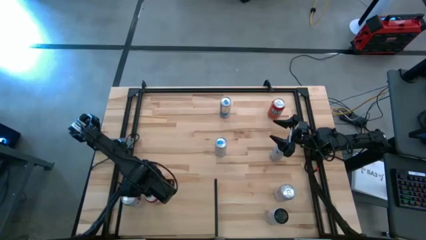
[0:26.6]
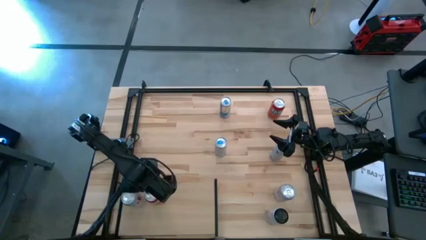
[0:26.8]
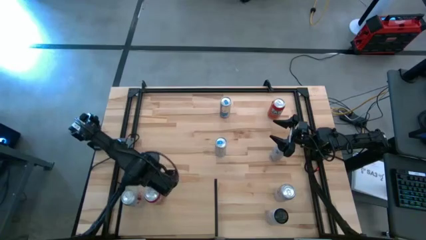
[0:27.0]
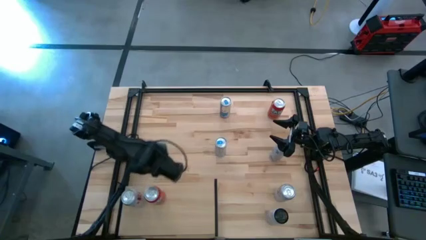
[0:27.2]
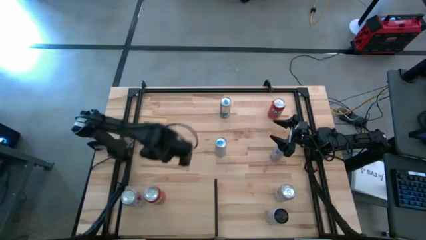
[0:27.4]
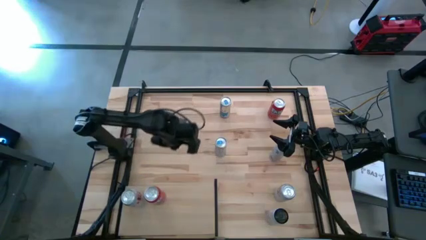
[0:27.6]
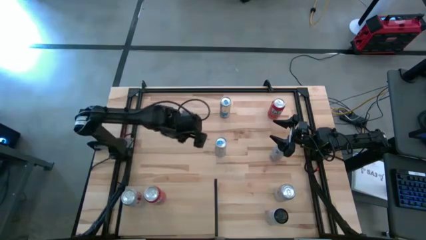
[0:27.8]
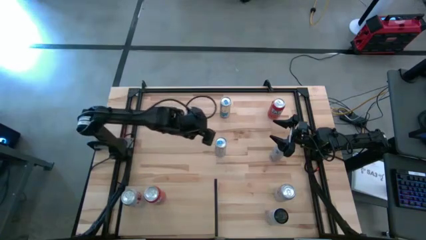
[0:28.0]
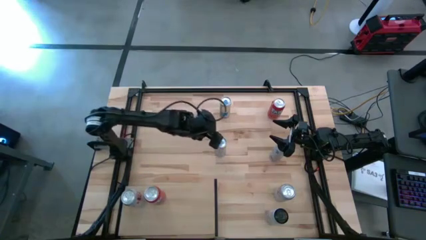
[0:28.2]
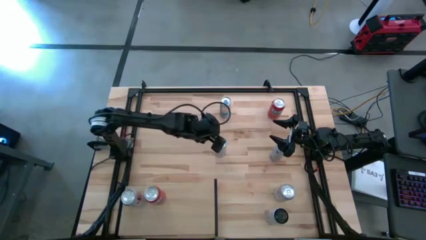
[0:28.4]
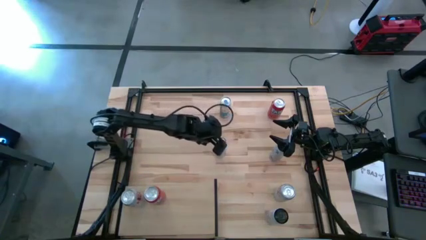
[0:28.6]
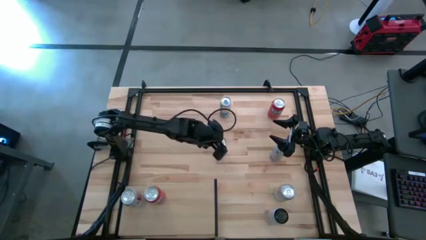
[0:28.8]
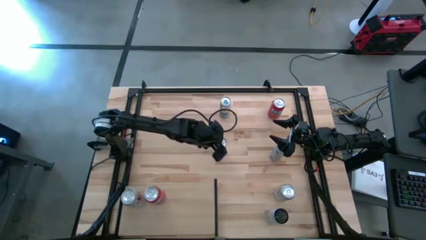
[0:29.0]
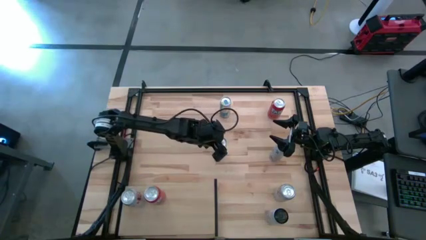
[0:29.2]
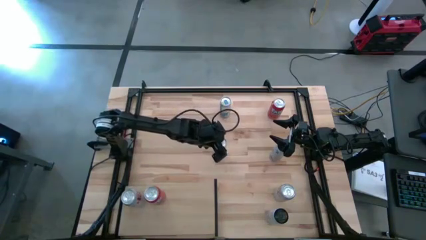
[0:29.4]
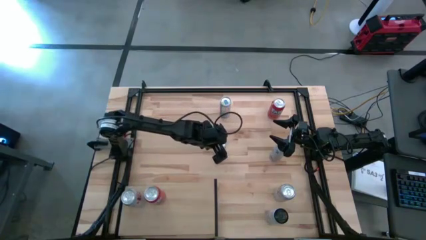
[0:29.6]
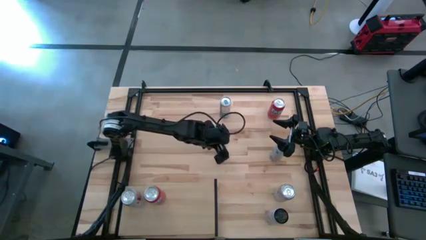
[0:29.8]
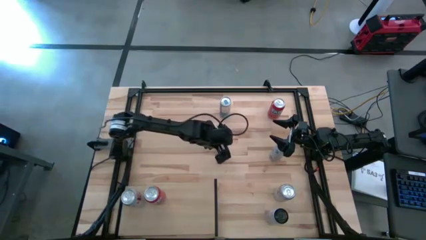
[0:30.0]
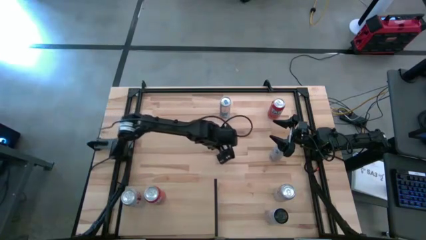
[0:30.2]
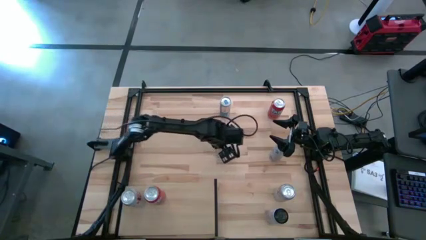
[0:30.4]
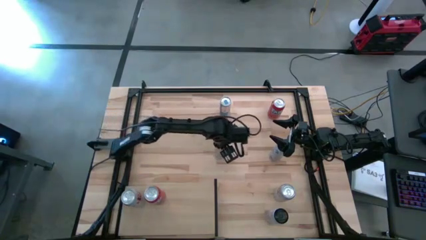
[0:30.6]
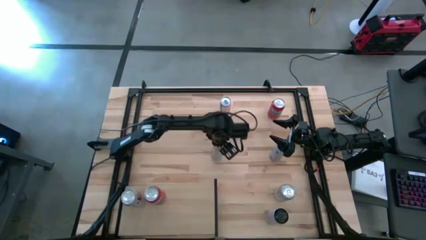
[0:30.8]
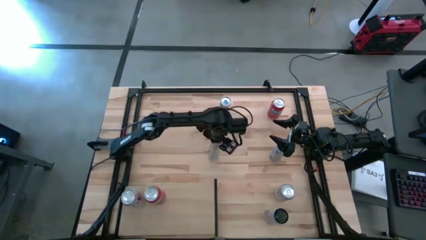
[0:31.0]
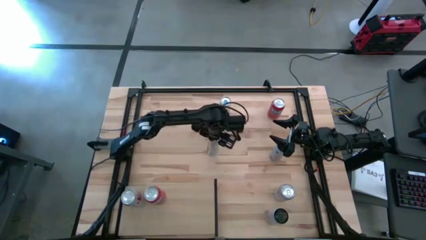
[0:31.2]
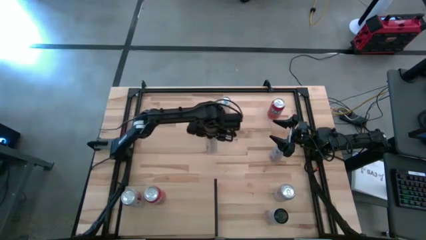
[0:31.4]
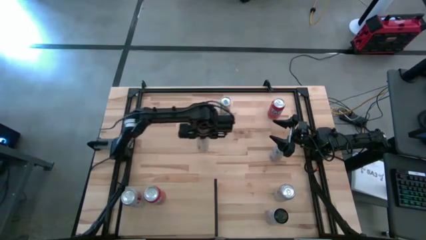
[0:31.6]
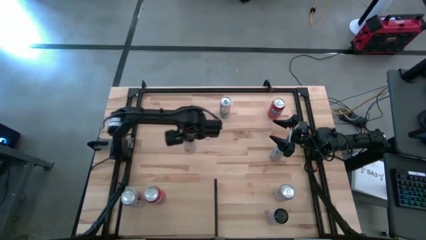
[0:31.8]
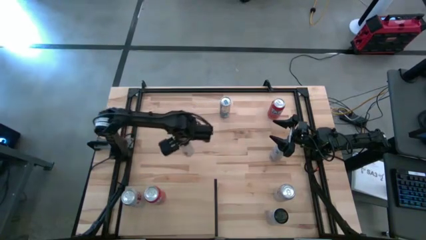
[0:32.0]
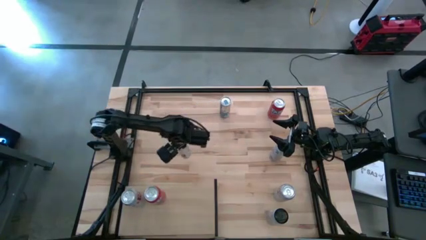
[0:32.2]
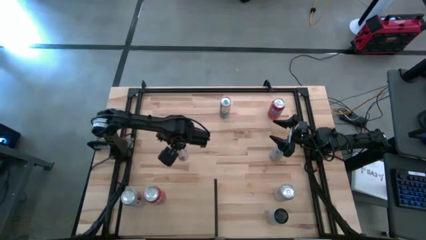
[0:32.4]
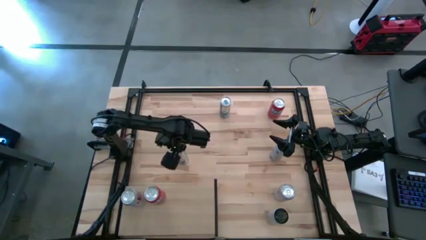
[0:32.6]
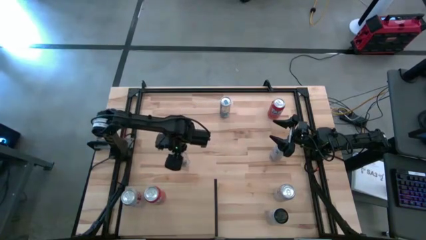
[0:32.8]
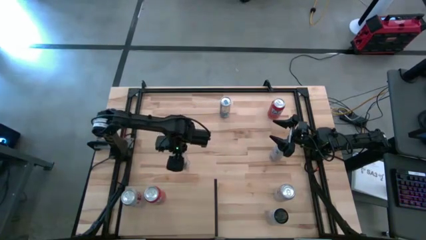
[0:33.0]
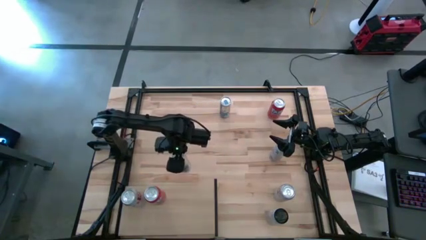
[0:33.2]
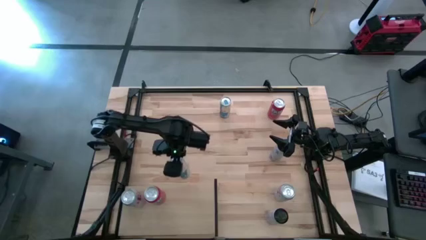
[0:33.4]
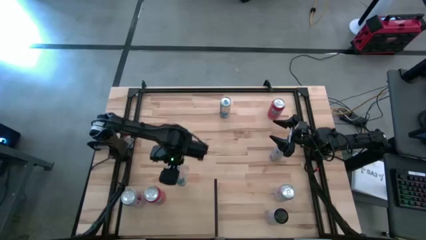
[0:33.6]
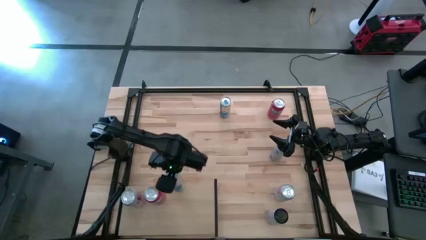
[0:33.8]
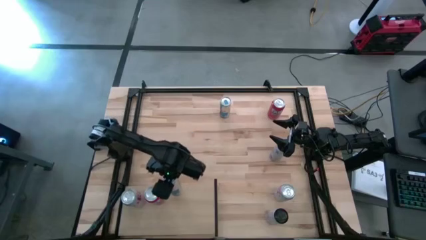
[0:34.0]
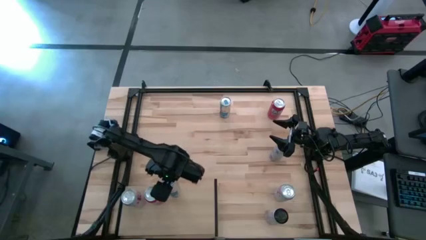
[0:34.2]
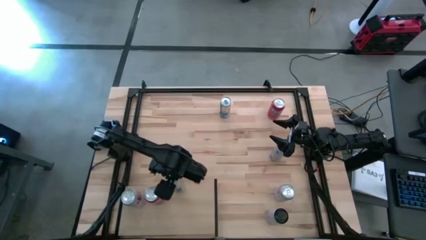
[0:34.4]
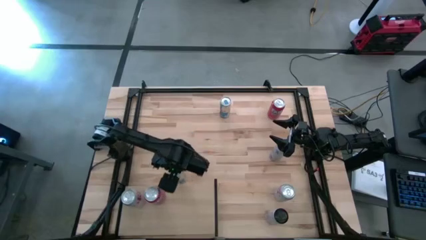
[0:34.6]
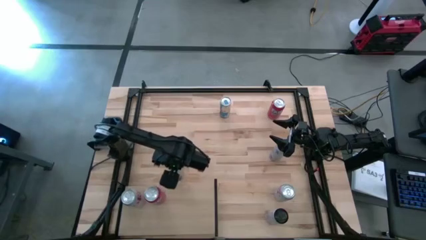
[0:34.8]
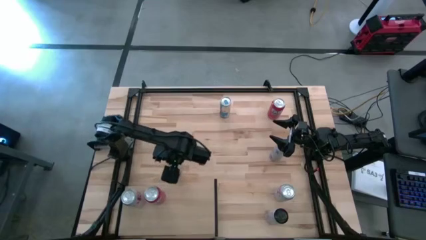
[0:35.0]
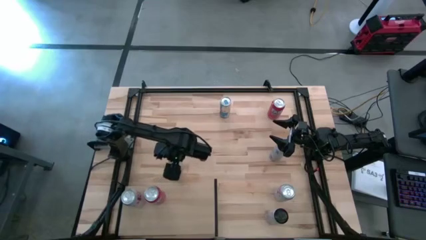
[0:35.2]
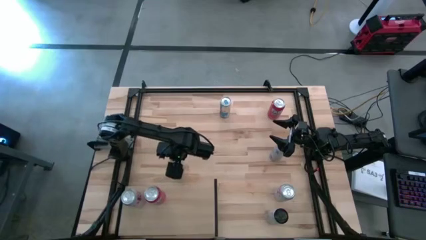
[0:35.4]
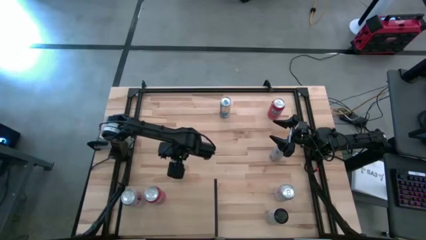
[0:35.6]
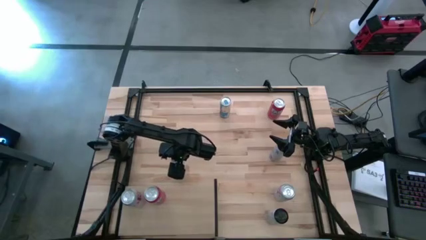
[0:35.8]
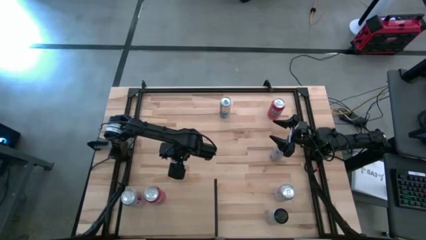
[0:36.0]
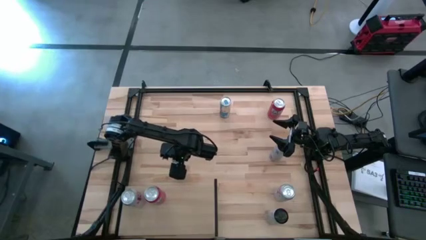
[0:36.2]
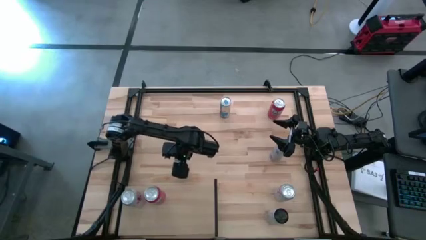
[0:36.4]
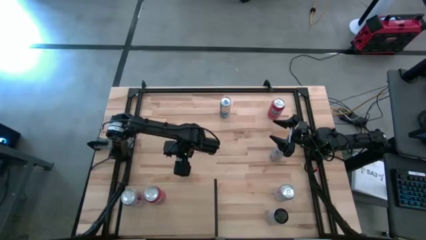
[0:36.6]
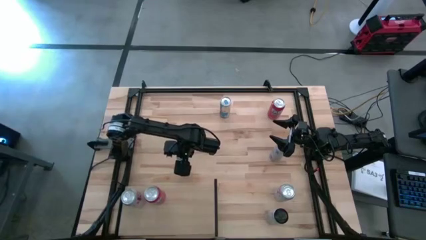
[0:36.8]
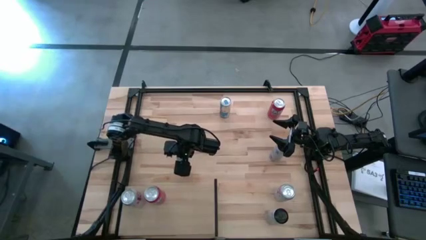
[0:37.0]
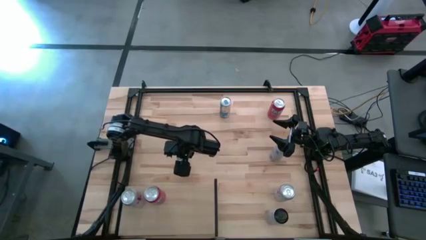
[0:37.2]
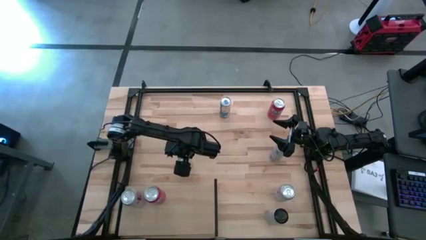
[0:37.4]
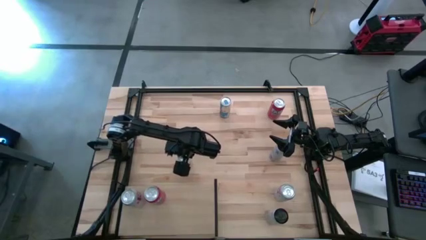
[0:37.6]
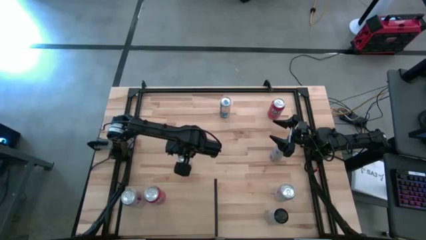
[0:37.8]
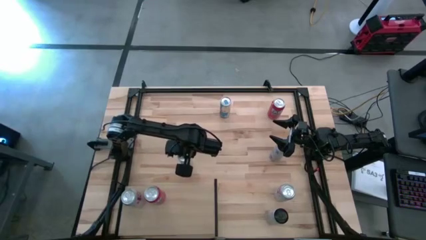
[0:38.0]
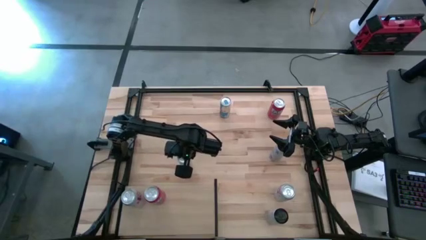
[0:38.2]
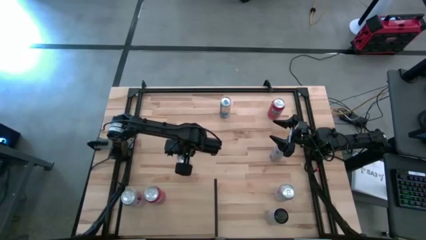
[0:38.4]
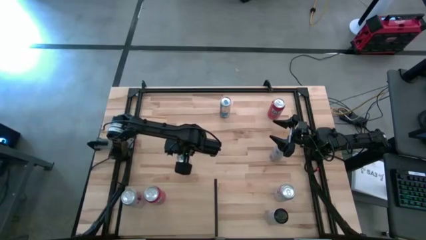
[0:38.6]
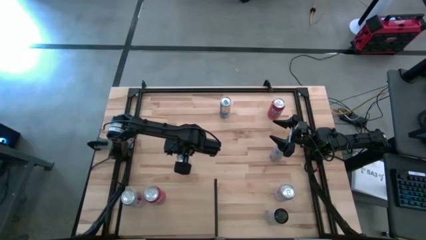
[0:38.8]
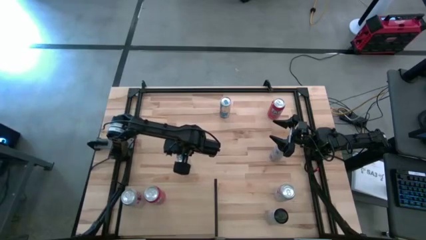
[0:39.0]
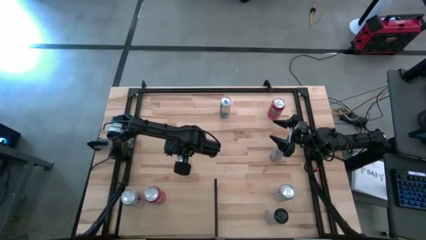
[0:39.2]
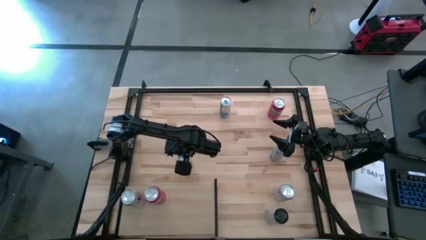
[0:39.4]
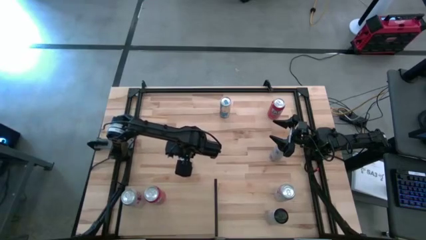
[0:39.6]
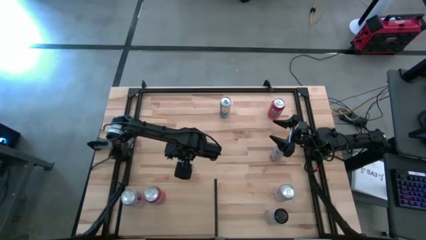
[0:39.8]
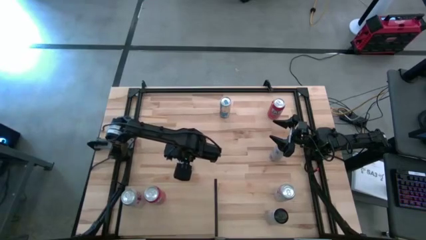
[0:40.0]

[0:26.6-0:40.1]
Task: Place canned beverage on shelf
Put the bottom blue soda can on the shelf
